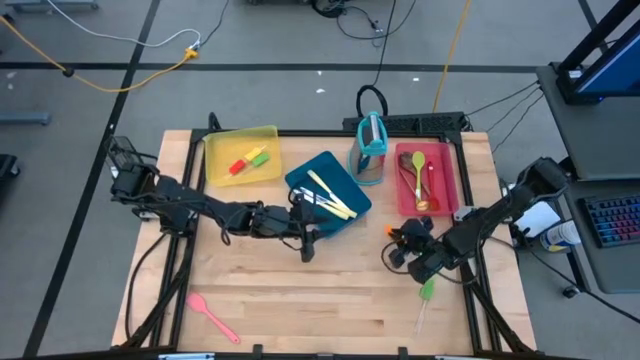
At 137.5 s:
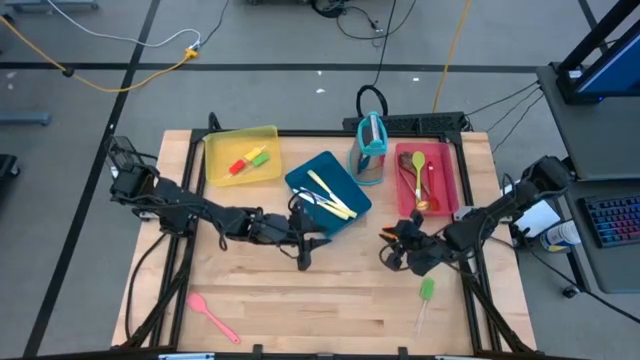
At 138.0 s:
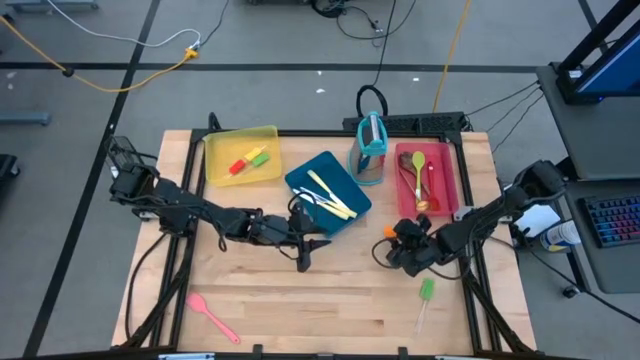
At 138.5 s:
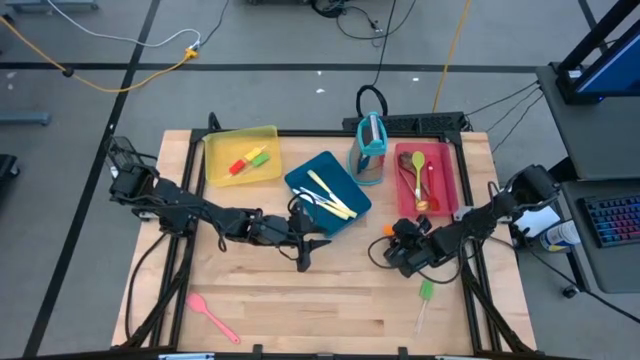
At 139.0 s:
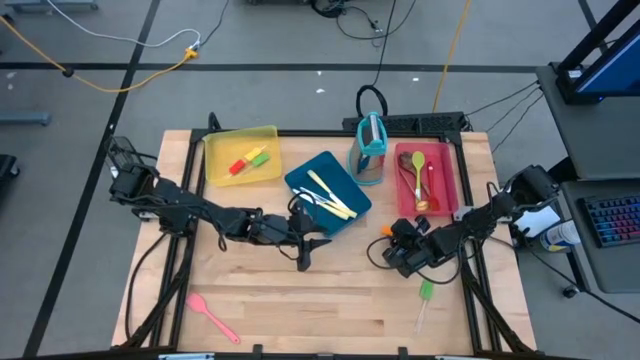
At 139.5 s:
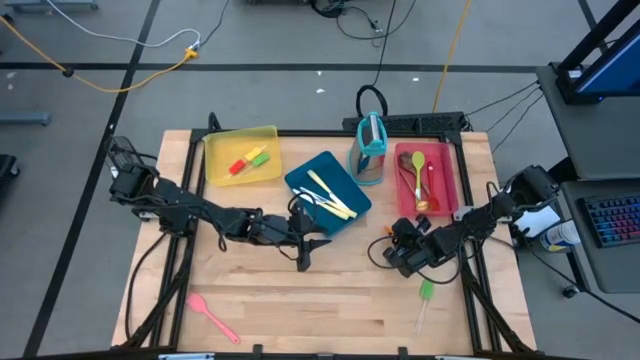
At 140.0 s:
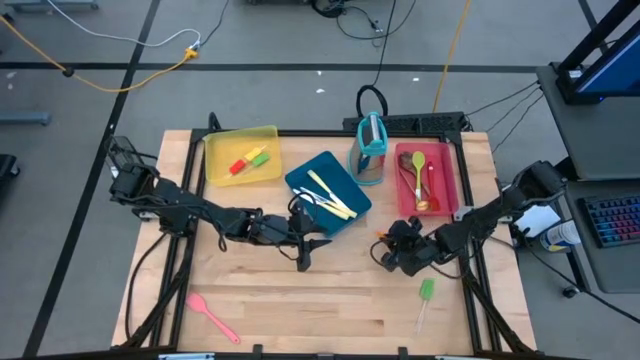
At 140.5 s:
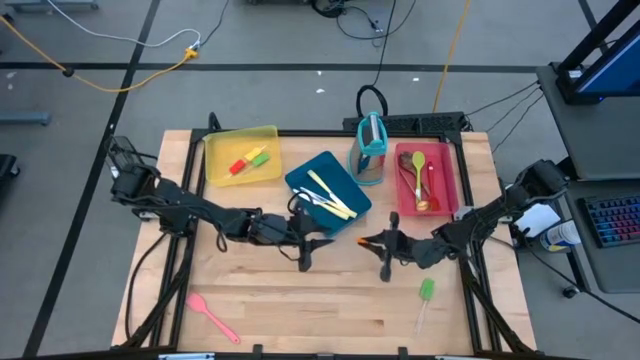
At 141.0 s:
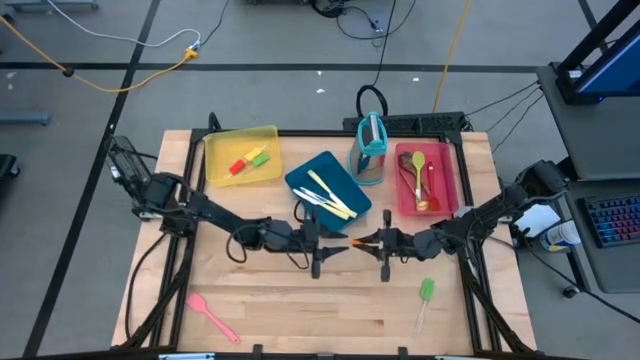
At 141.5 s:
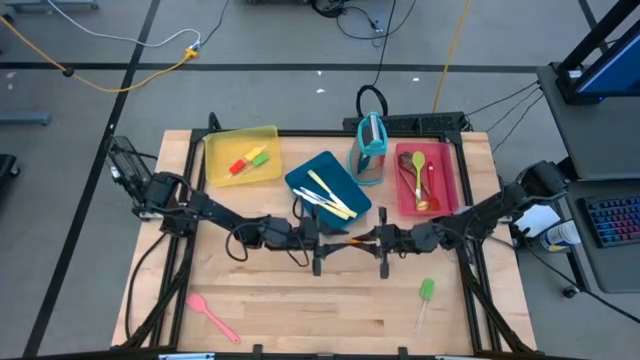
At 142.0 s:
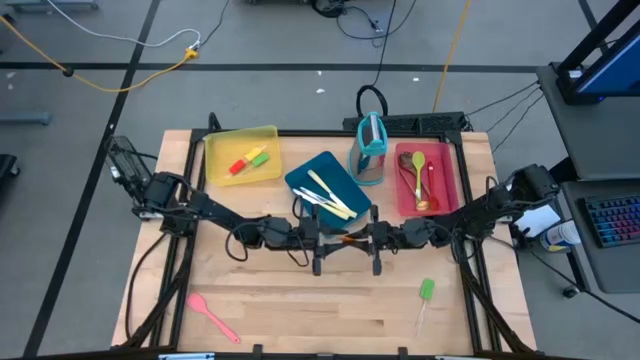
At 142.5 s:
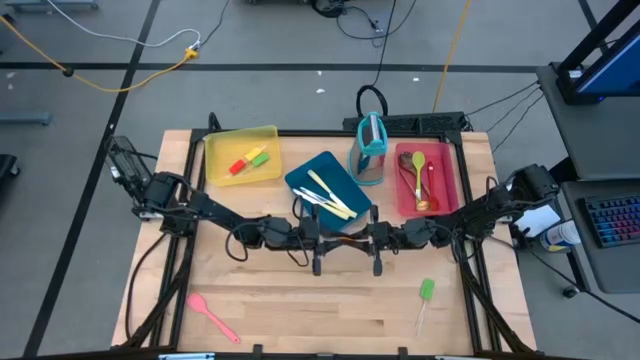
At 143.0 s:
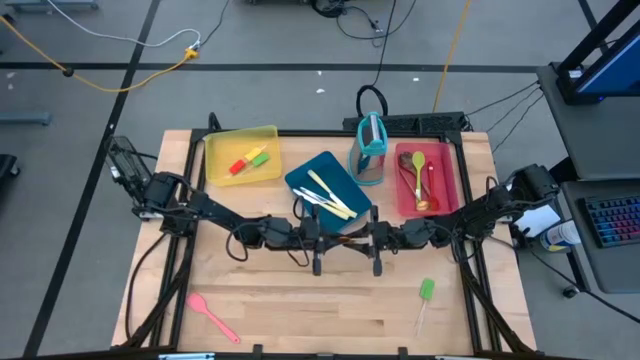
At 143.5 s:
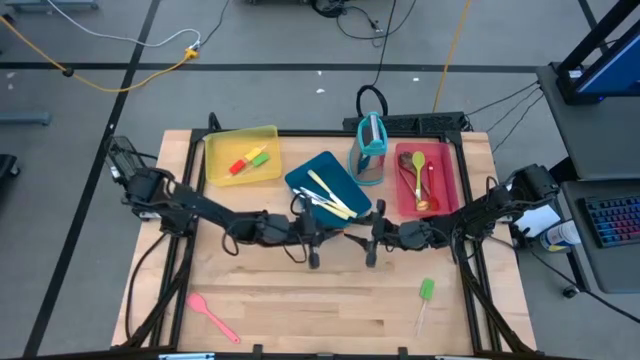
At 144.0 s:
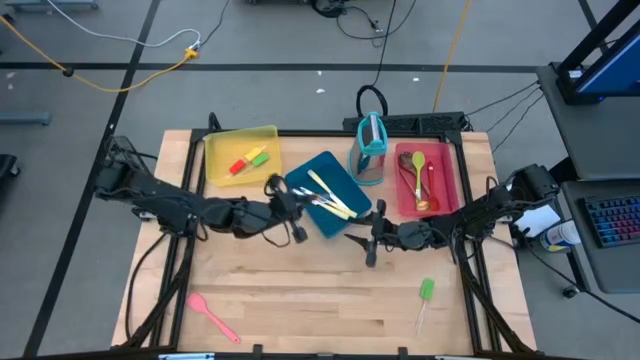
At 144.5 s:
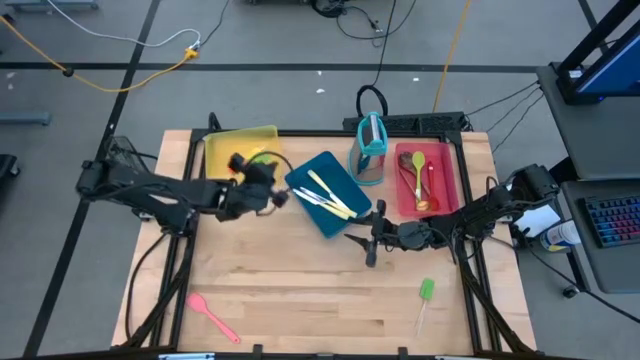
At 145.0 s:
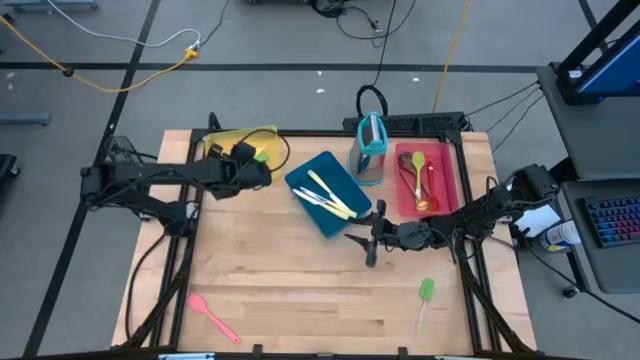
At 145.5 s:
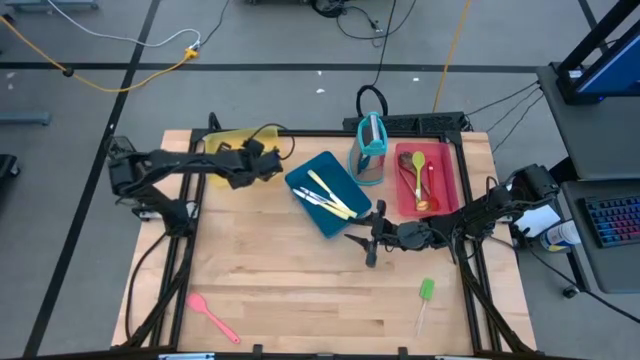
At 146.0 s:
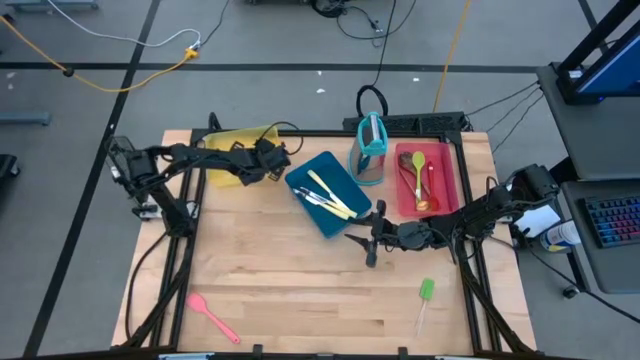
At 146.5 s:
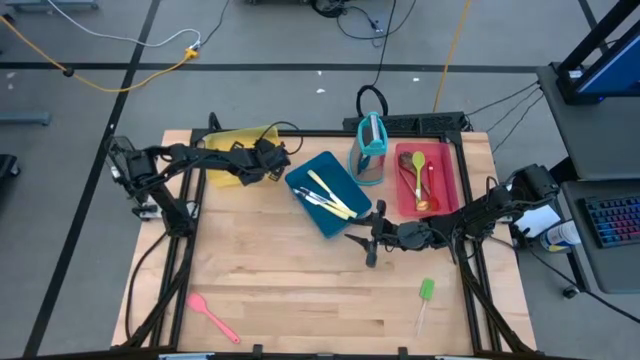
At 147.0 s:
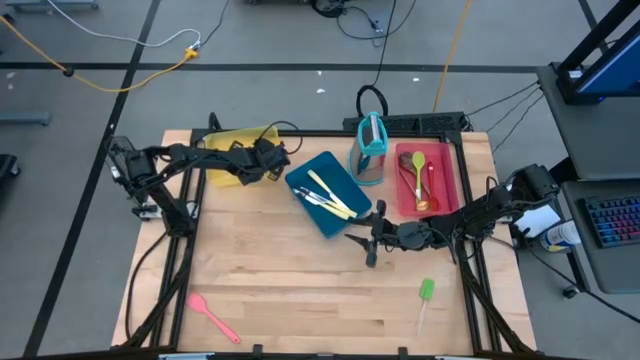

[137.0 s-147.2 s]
Task: Pick & Place Kitchen Items
Put the orange spatula into the yellow bin

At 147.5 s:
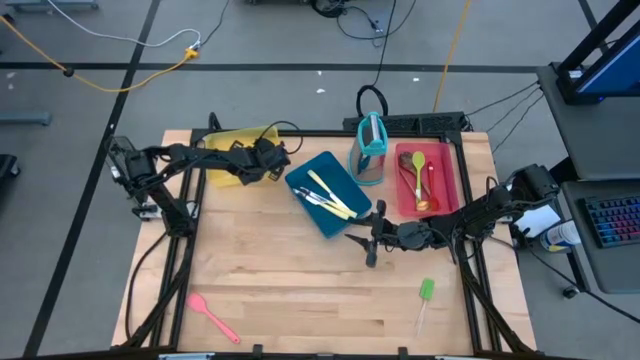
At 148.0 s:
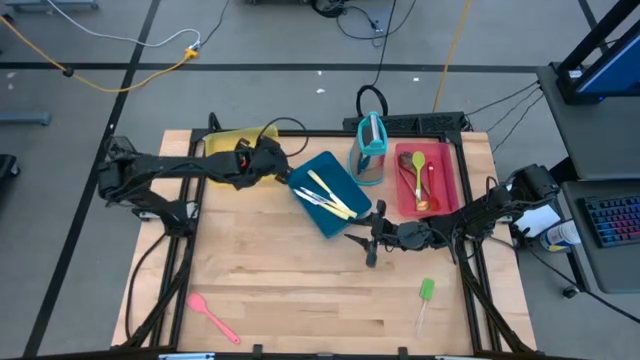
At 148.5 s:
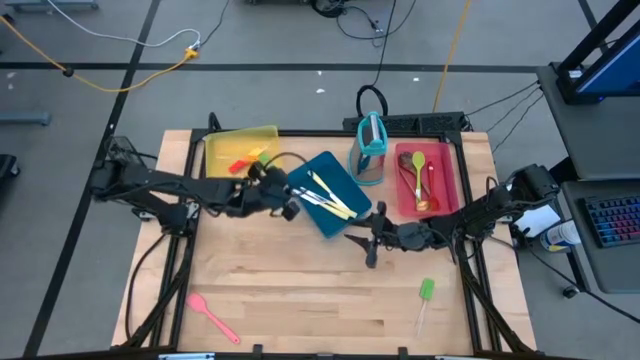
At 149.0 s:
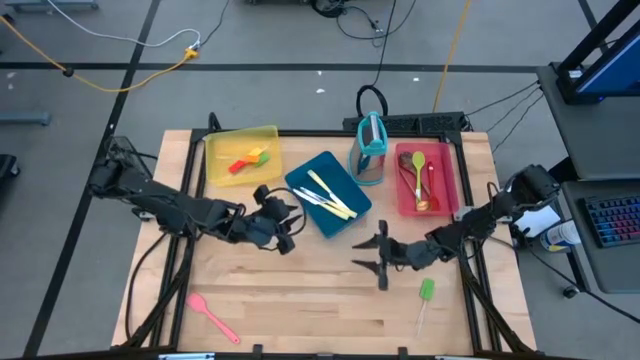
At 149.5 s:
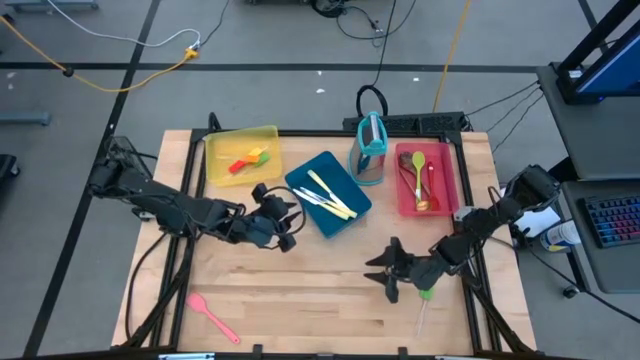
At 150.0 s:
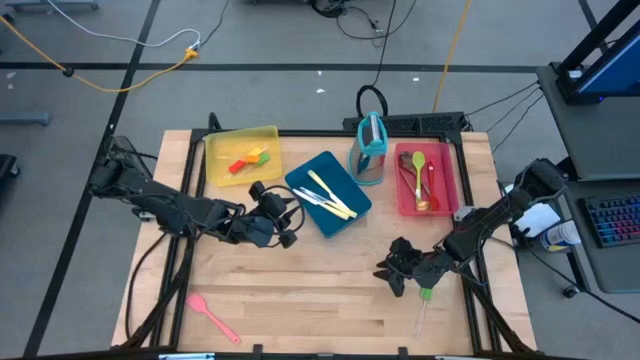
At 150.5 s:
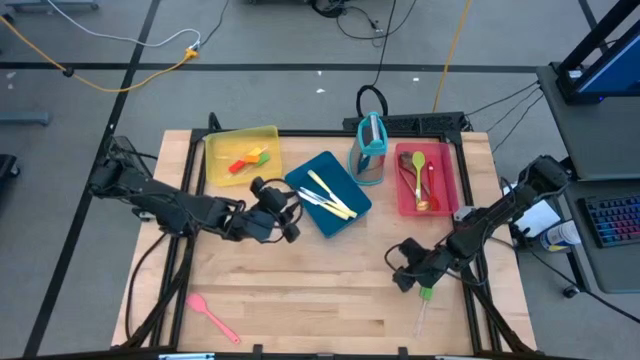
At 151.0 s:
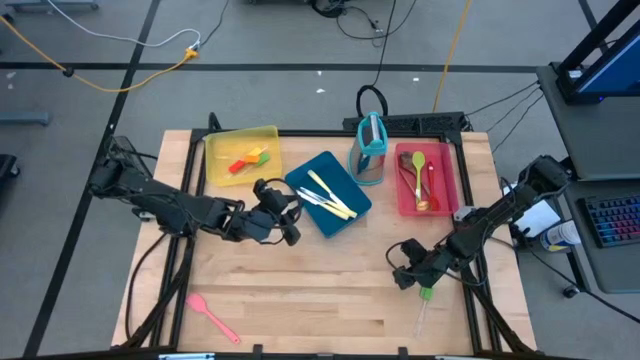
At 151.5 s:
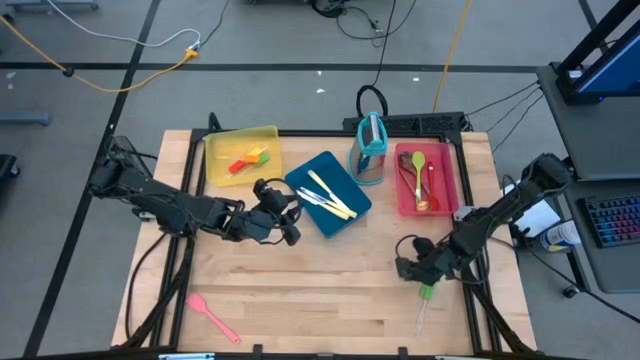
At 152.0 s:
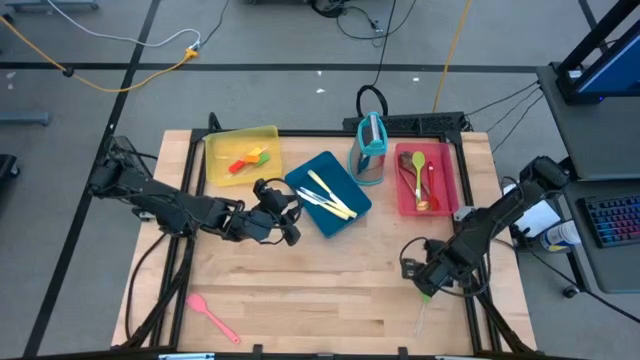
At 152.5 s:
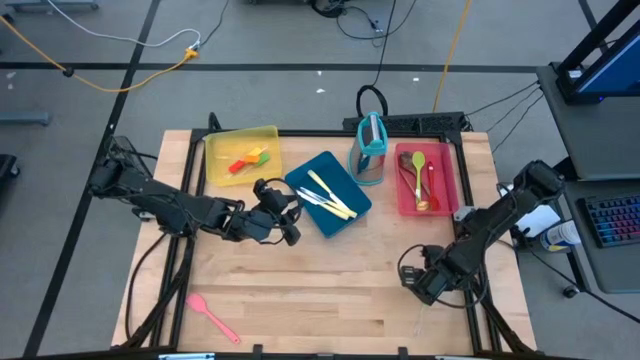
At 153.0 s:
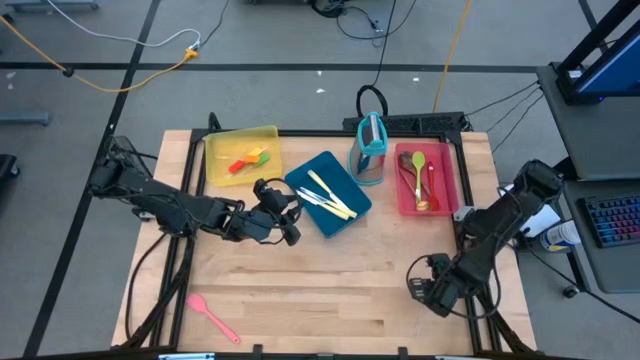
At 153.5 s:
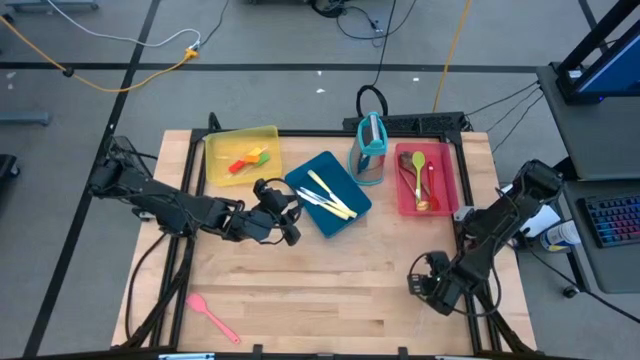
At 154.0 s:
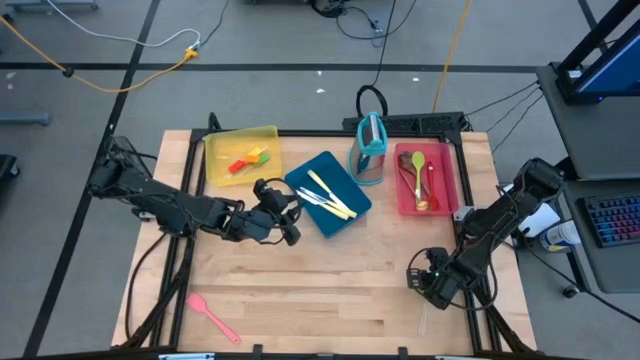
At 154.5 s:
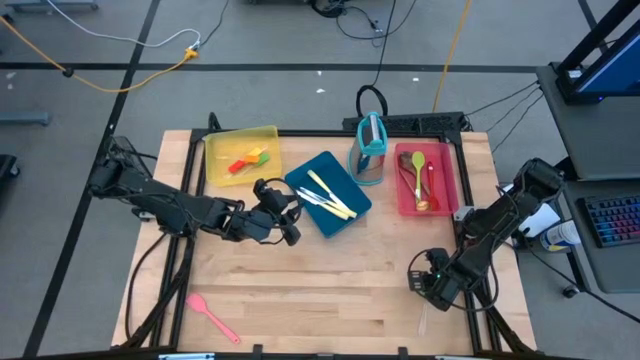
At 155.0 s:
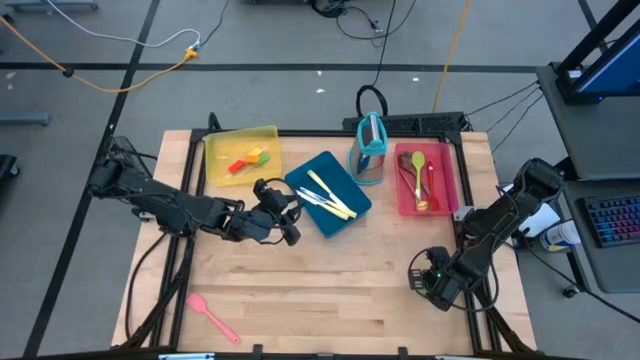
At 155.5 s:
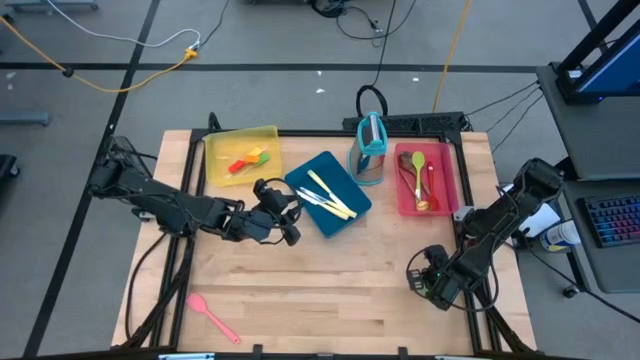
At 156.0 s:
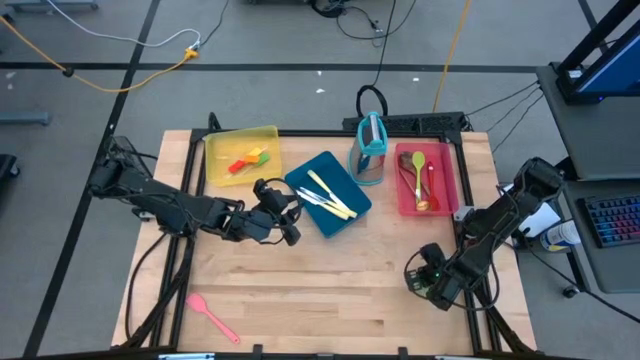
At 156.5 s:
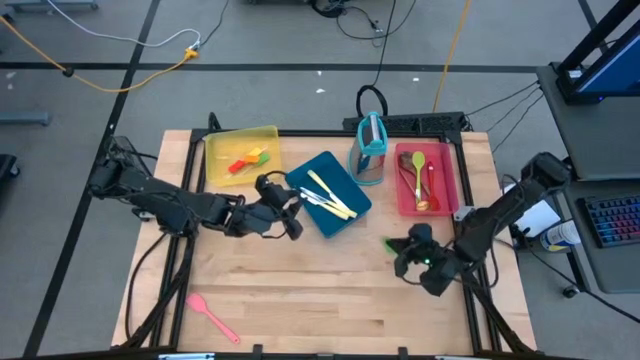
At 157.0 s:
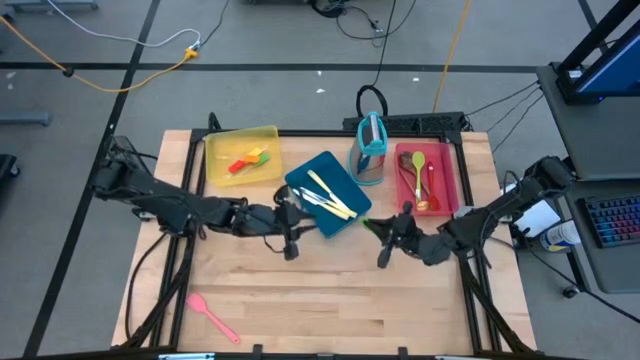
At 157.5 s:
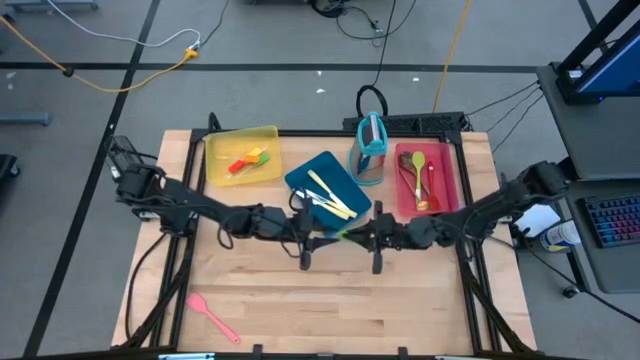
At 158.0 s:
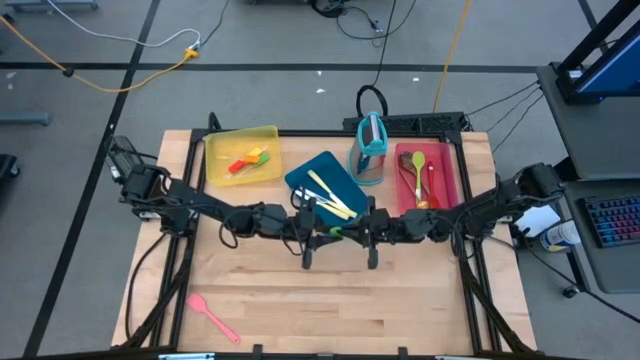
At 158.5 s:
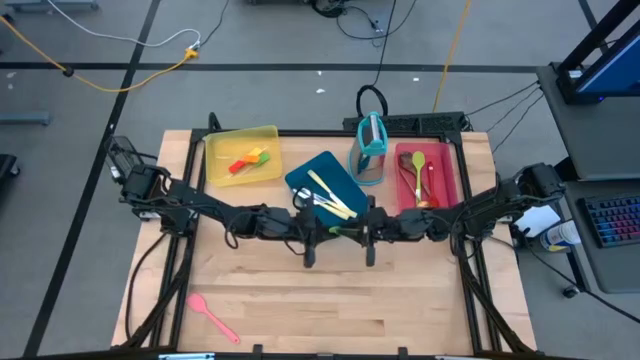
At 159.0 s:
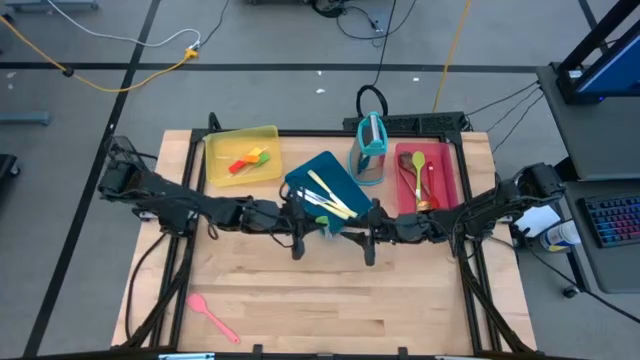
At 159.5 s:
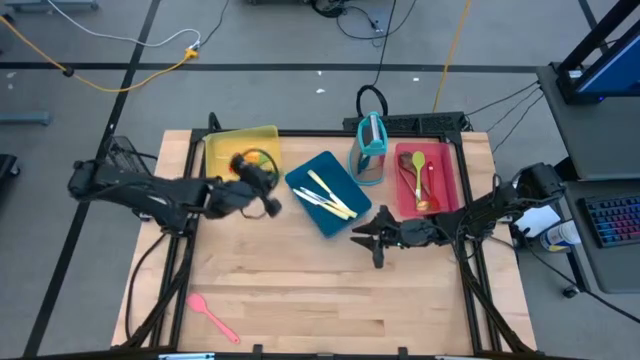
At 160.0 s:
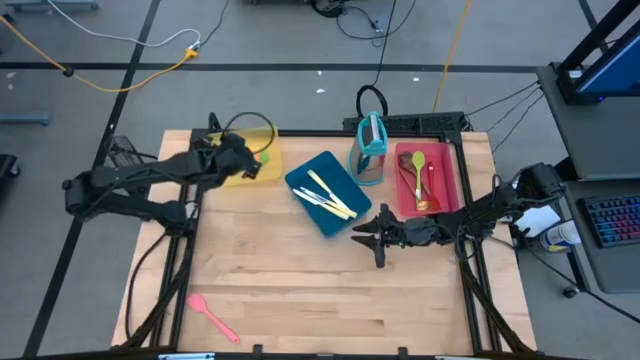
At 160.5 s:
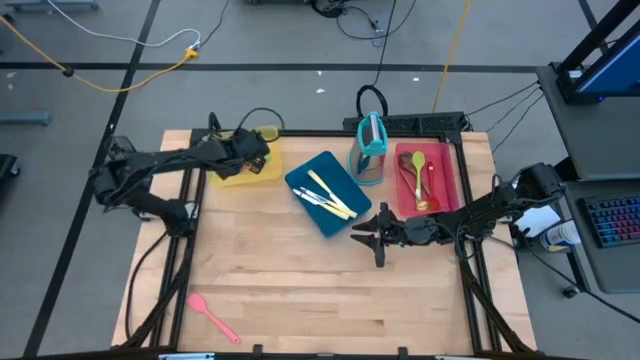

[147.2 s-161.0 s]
Put the green spatula into the yellow bin
